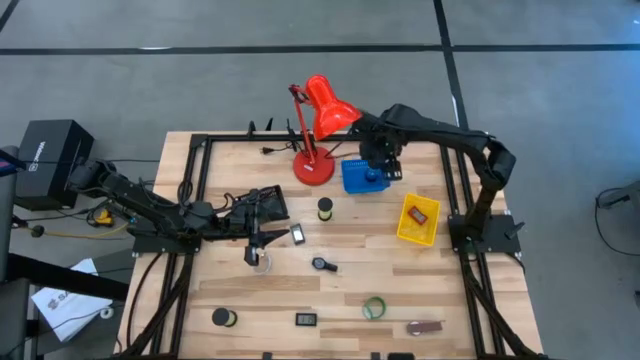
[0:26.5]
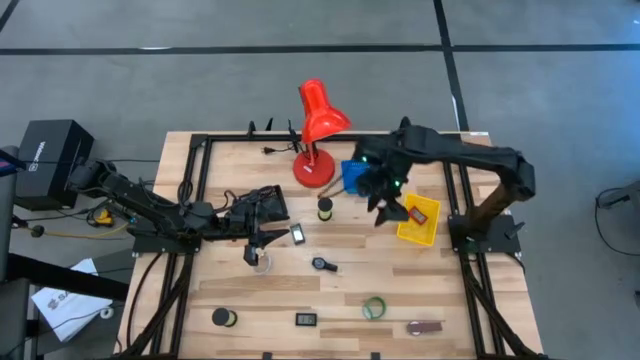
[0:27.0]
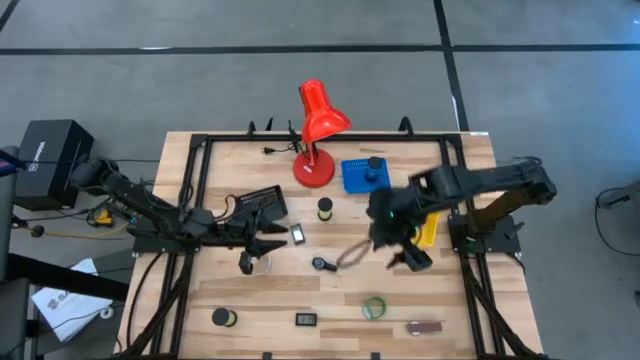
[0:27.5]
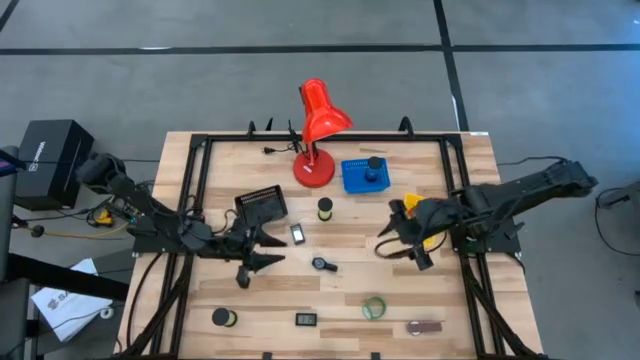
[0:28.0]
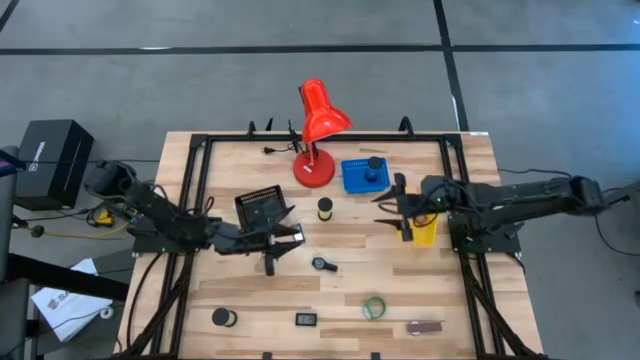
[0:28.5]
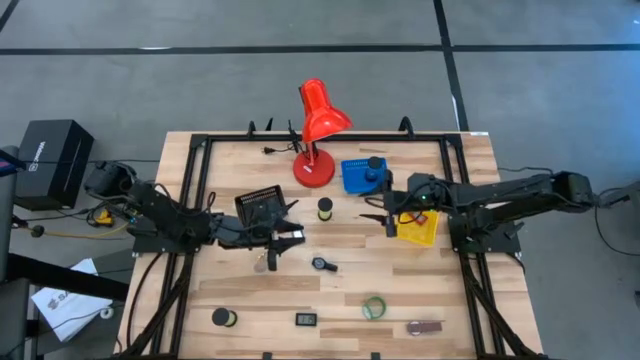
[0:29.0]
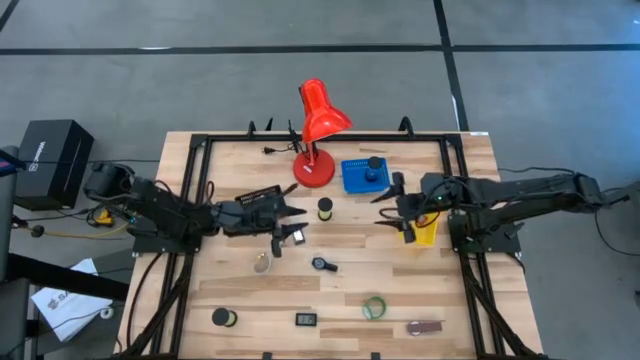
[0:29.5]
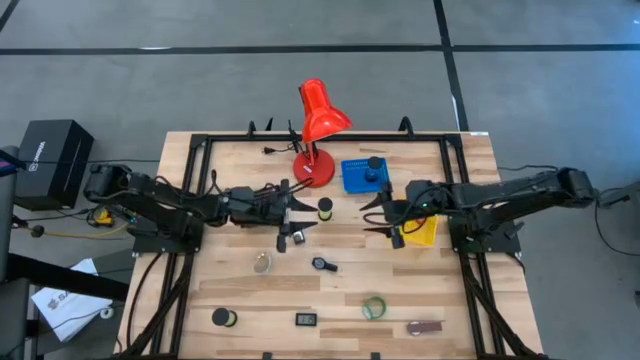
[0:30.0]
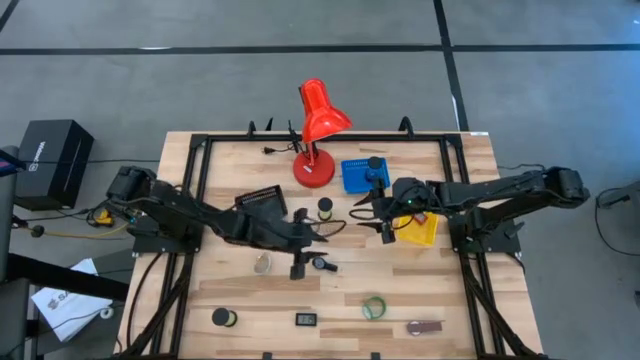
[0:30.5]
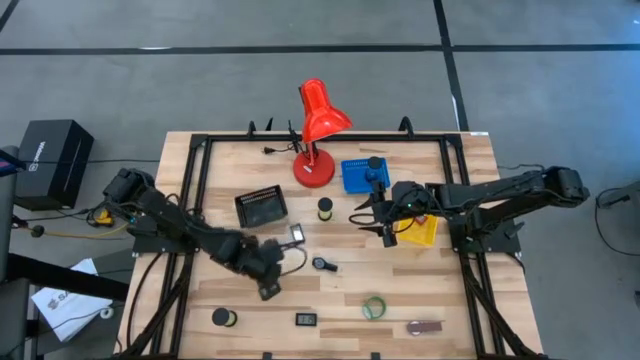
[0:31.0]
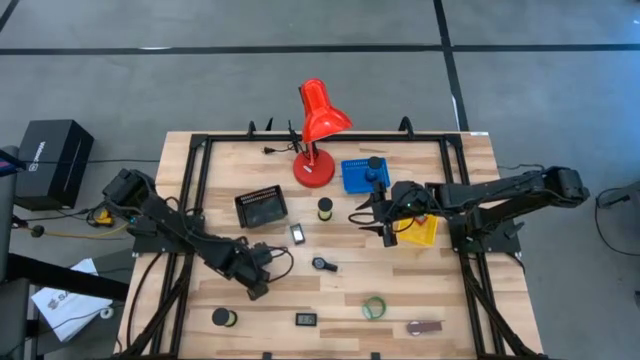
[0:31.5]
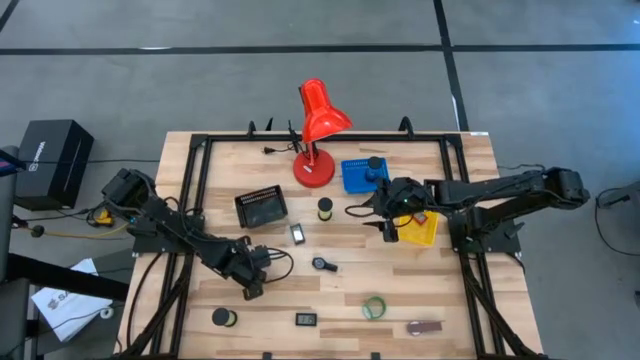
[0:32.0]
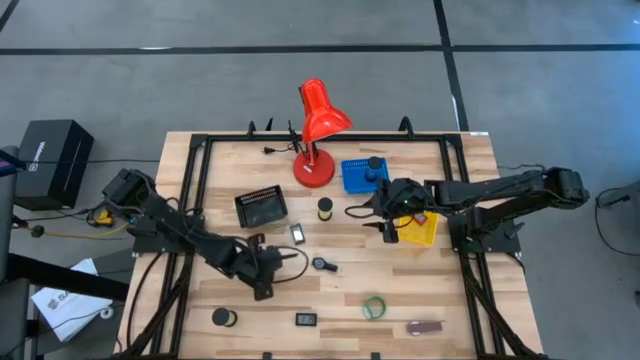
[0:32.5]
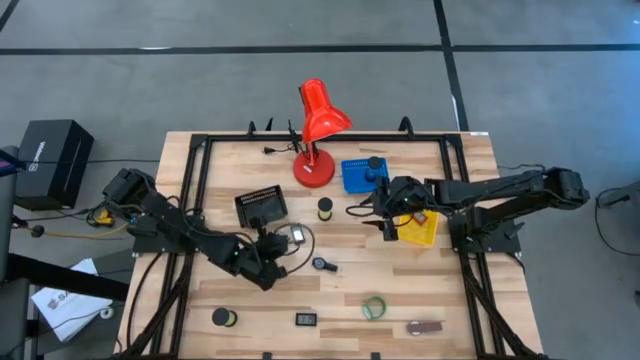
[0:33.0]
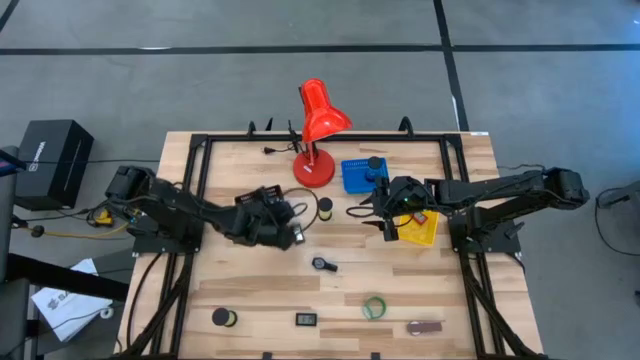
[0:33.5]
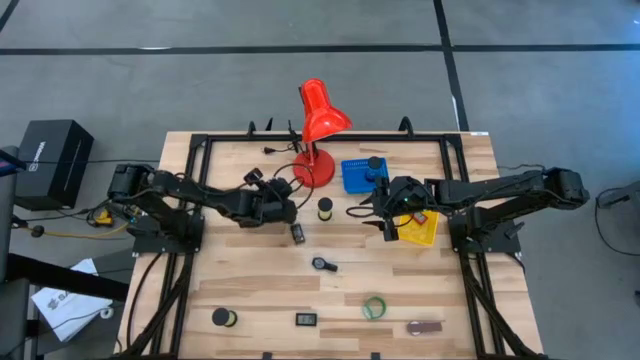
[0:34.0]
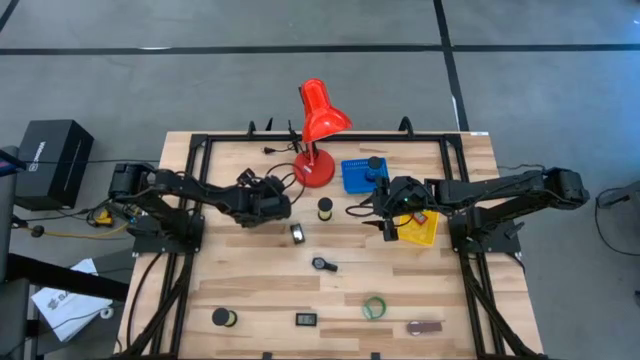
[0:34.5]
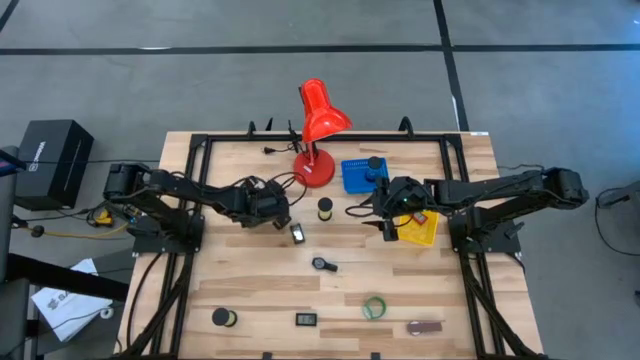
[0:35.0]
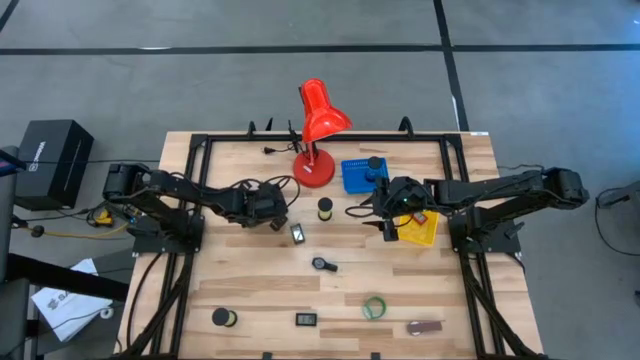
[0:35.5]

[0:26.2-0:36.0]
Task: Pick & Place Office items
Put the light blue wristwatch into the black basket

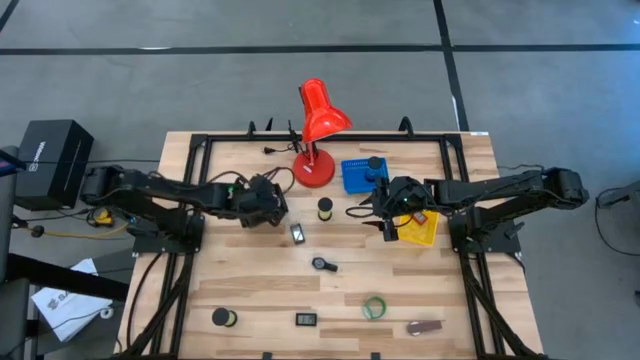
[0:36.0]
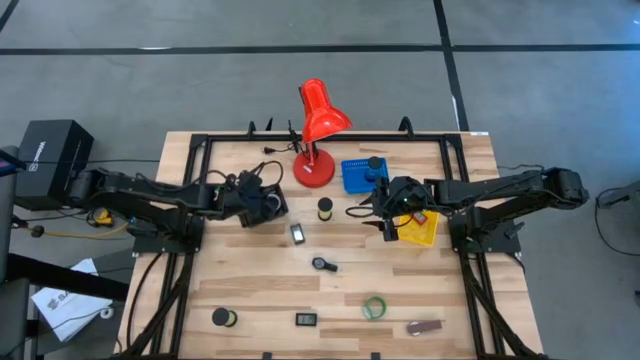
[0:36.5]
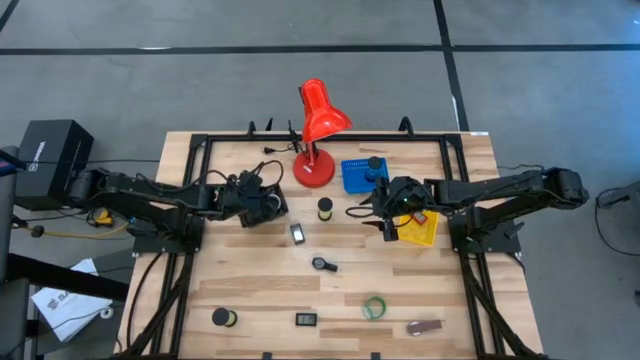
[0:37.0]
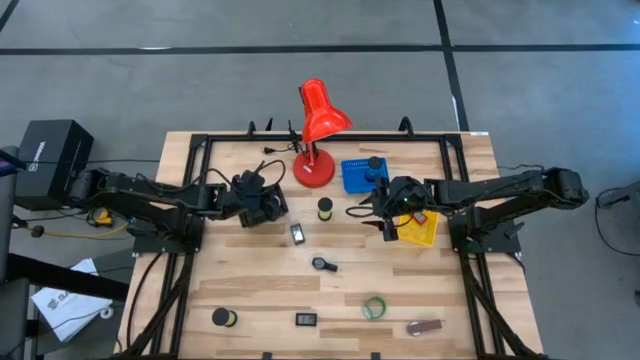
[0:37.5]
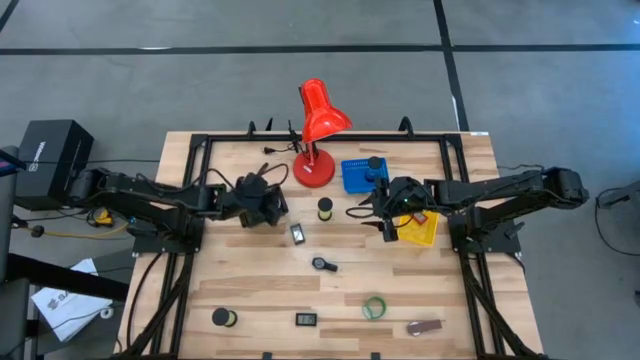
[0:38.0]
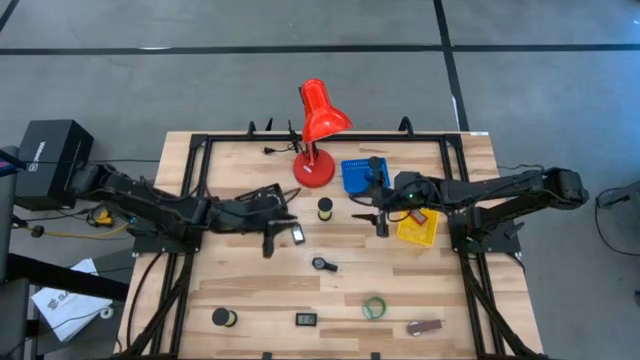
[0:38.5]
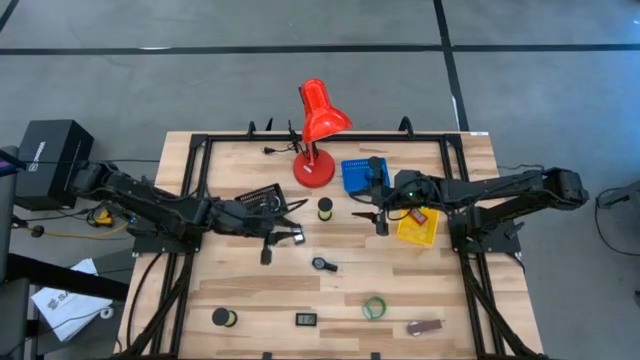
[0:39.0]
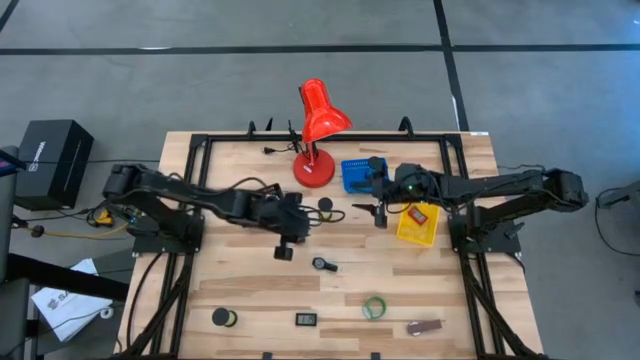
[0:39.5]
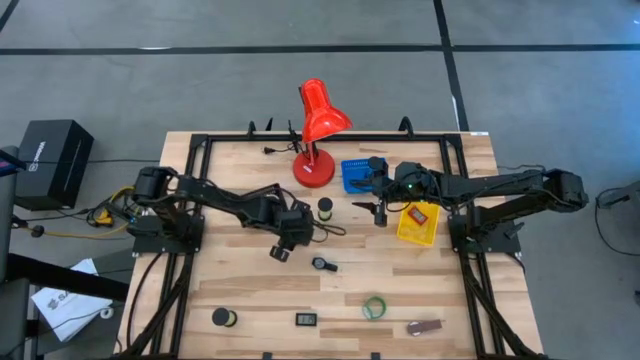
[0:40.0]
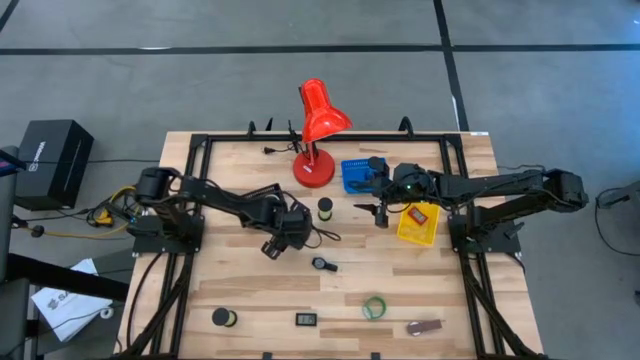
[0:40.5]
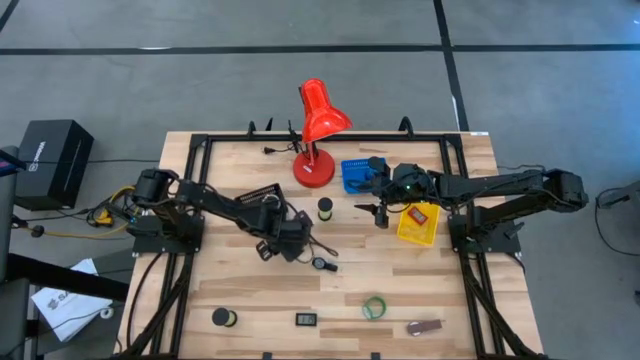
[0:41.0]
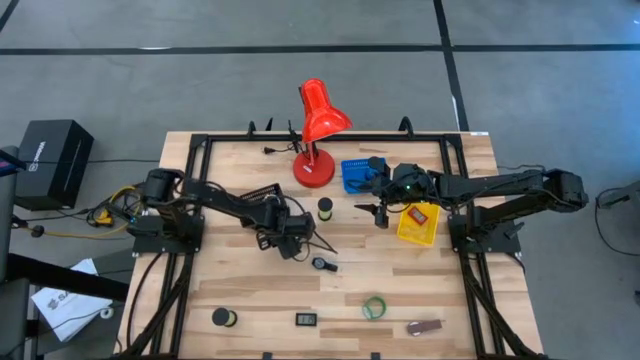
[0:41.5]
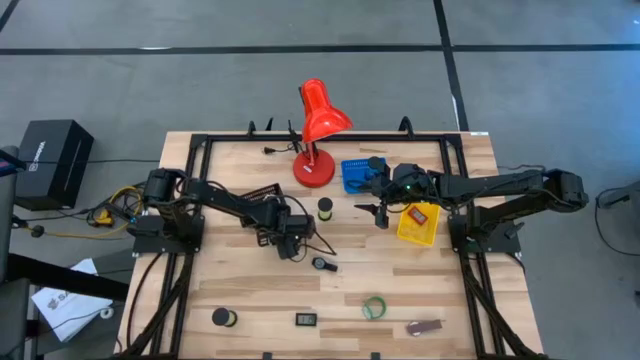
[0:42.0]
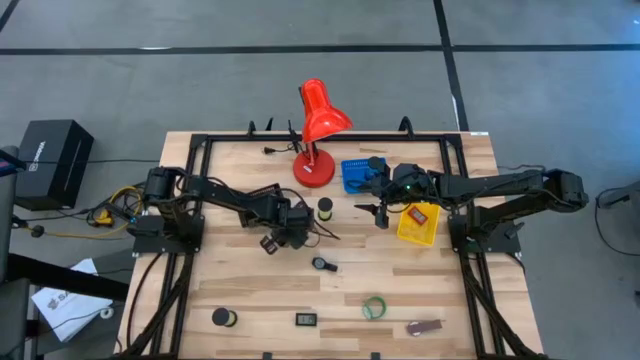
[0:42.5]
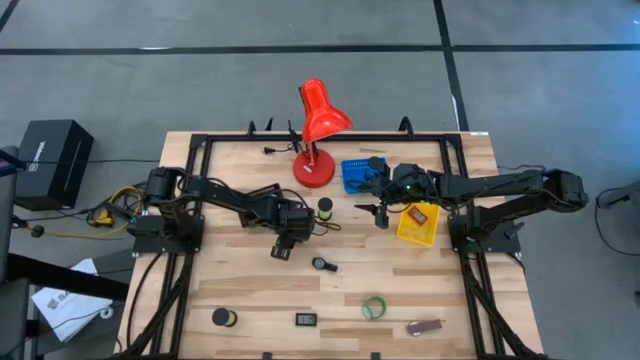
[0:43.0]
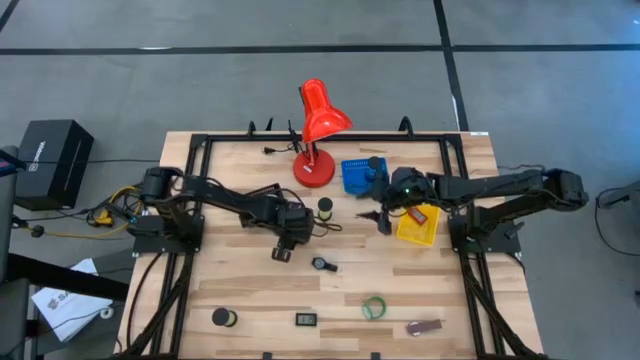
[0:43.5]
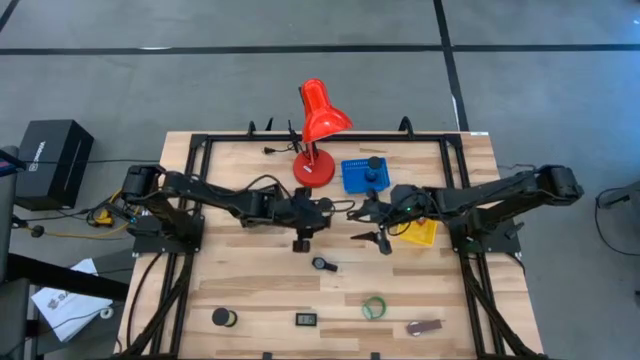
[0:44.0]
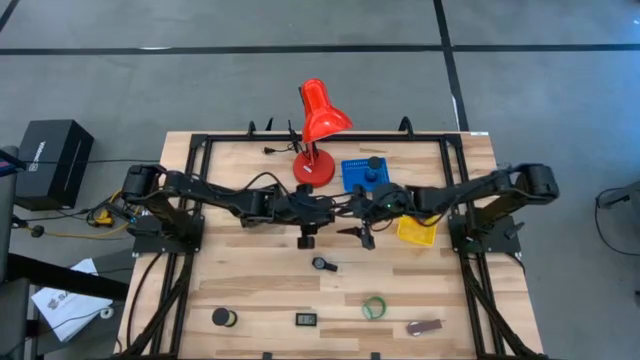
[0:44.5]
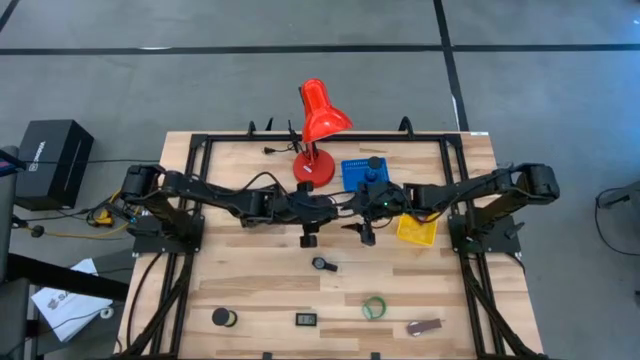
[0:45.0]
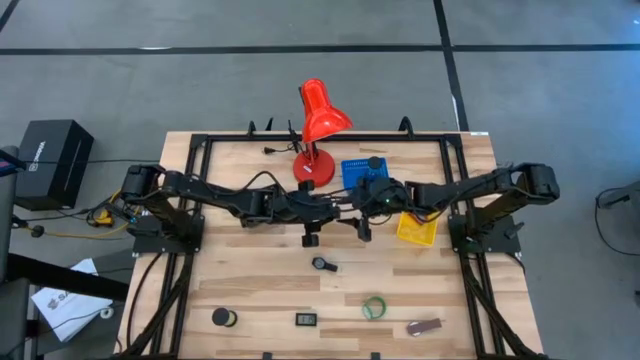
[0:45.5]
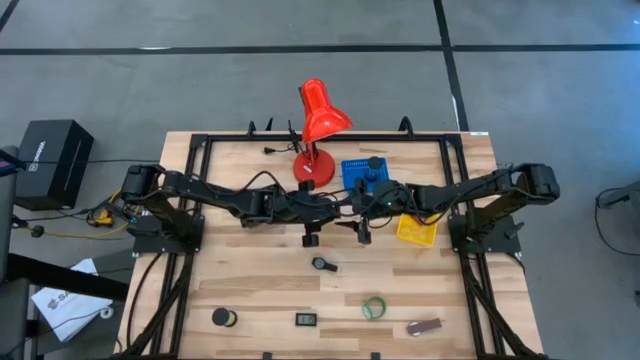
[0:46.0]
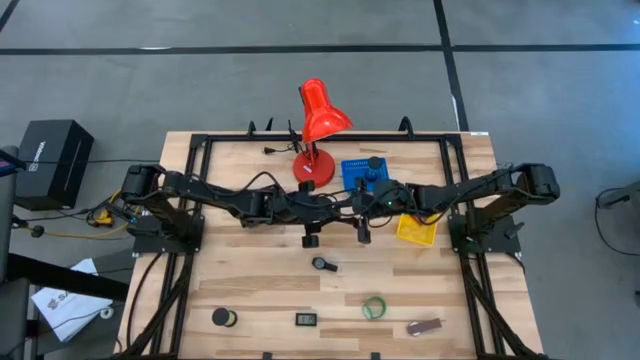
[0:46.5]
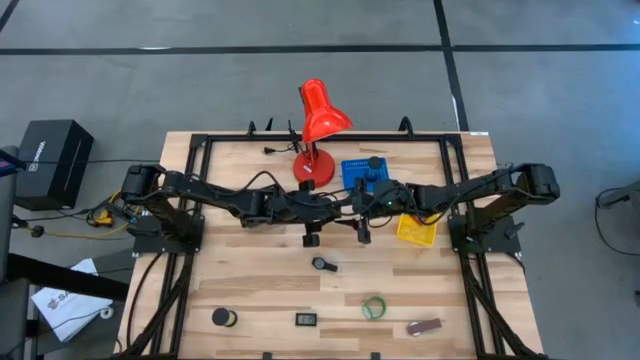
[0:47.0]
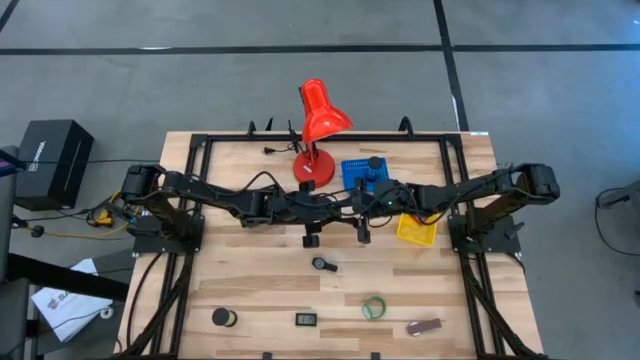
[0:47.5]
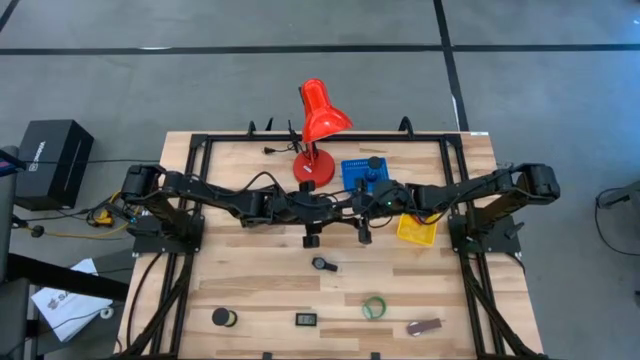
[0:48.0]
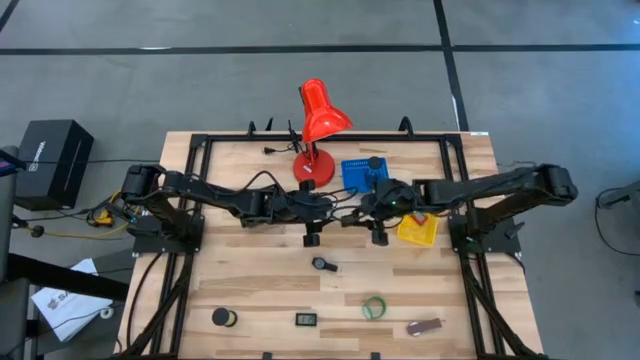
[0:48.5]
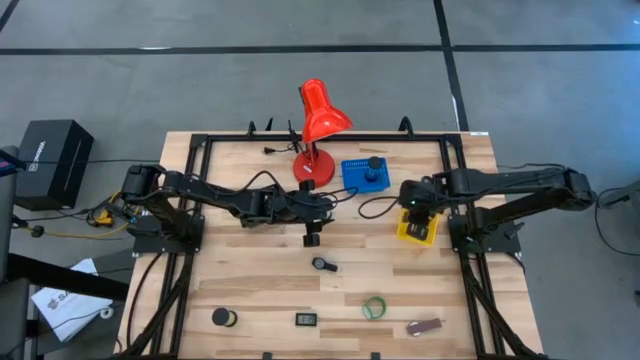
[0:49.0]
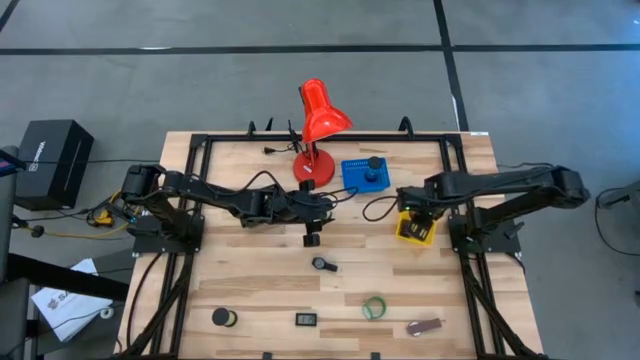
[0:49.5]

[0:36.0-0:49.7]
Put the top black digital clock into the yellow basket
